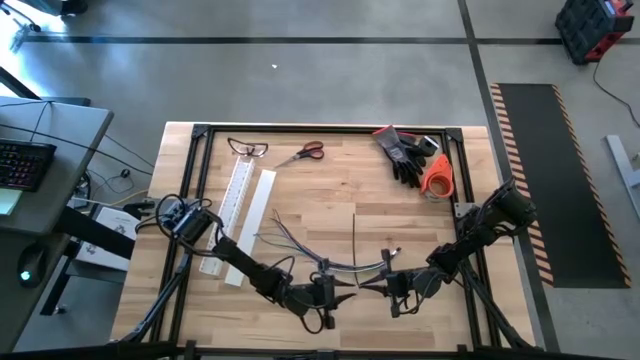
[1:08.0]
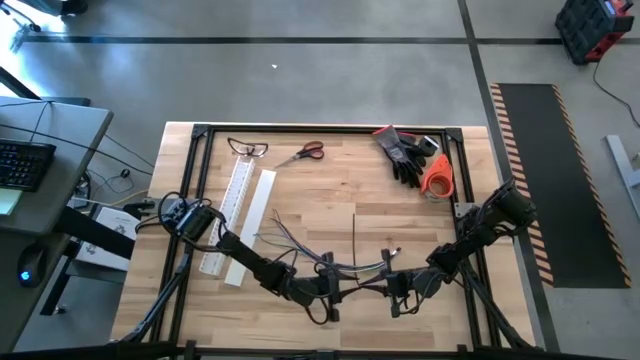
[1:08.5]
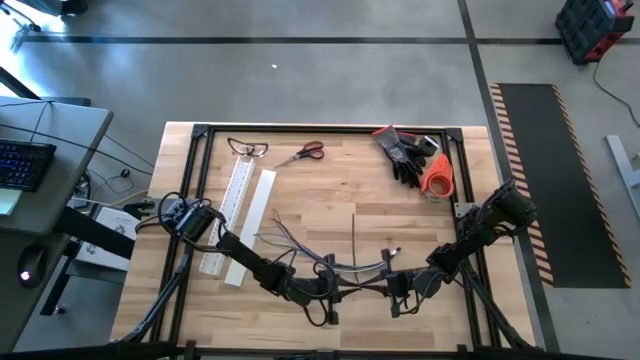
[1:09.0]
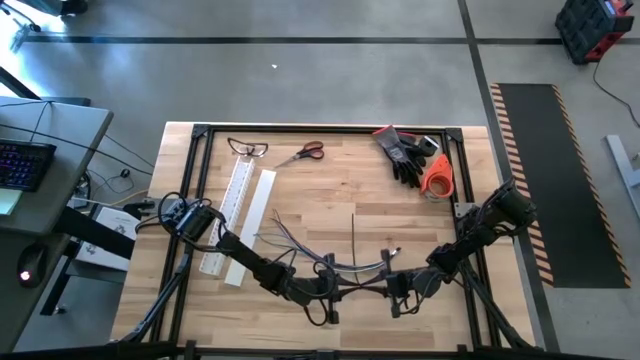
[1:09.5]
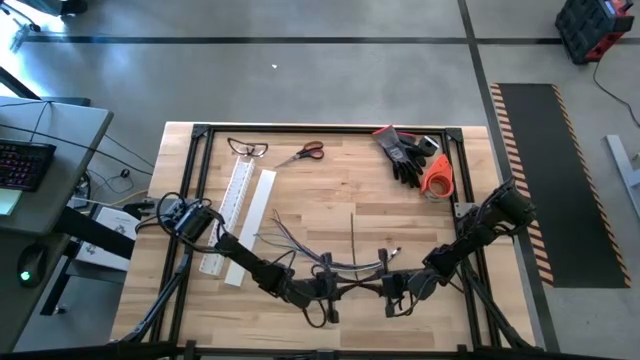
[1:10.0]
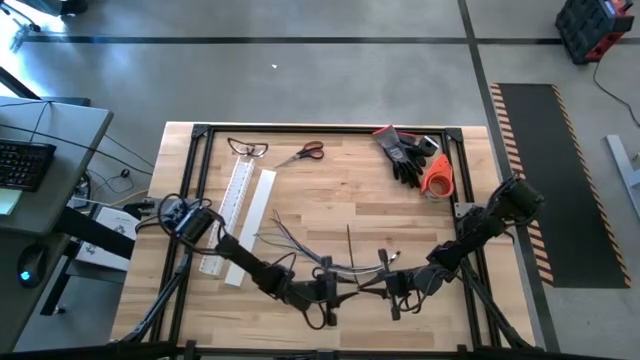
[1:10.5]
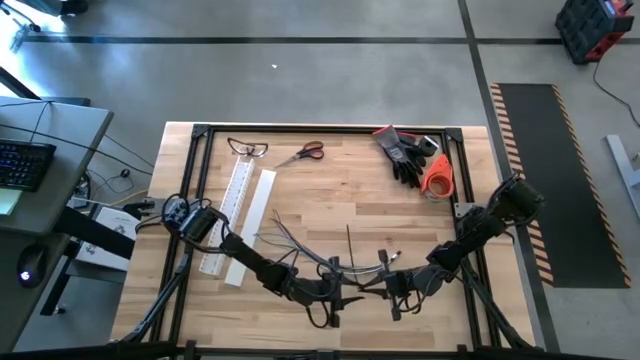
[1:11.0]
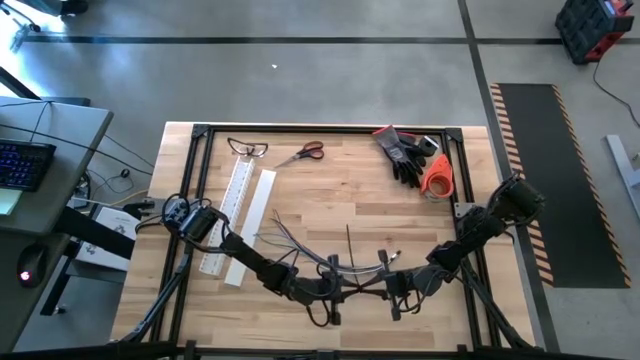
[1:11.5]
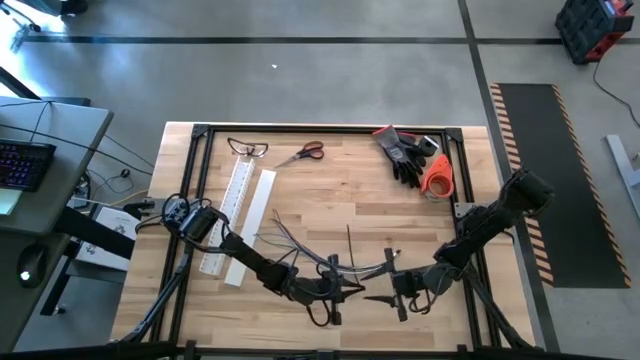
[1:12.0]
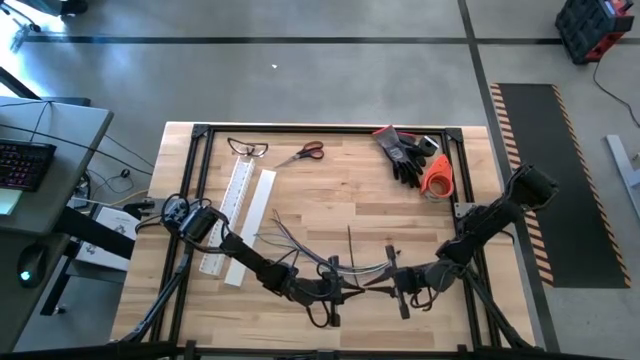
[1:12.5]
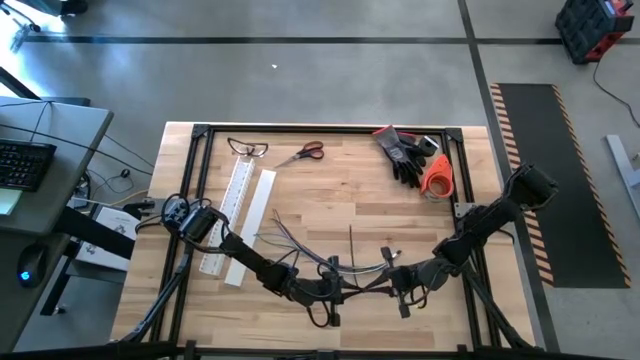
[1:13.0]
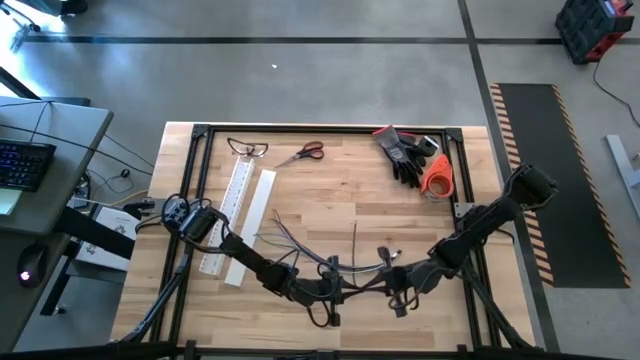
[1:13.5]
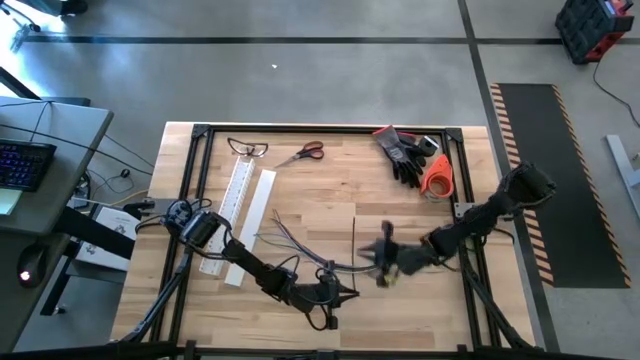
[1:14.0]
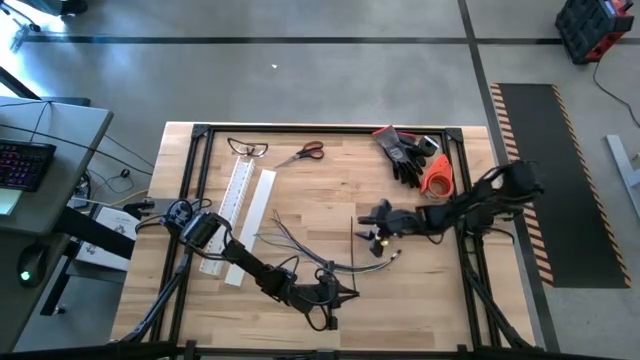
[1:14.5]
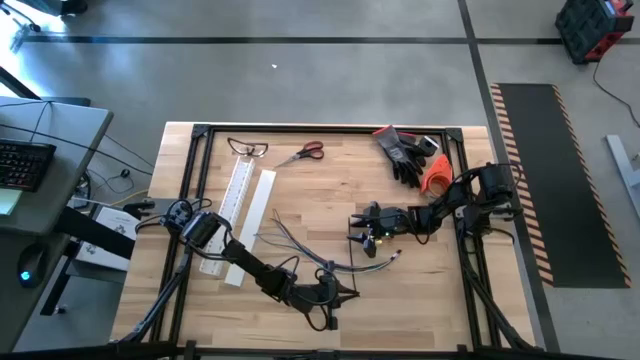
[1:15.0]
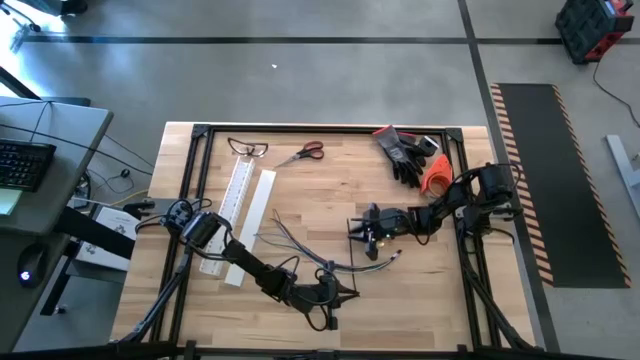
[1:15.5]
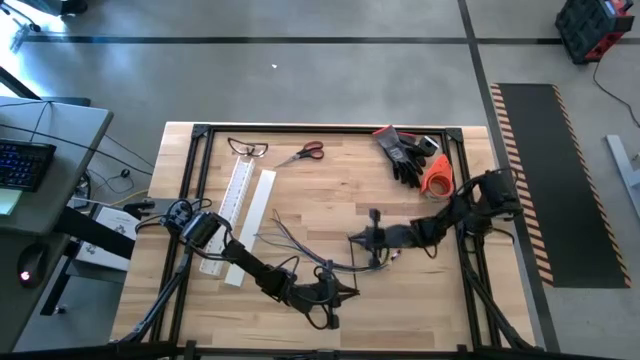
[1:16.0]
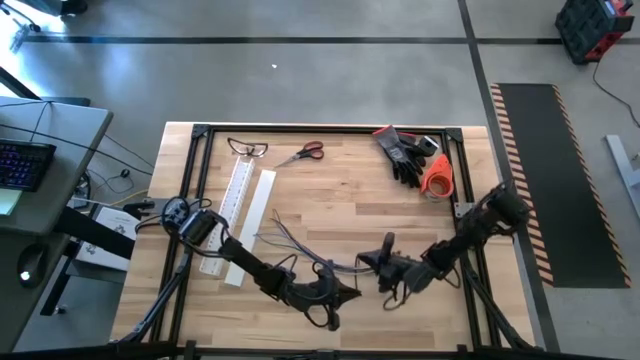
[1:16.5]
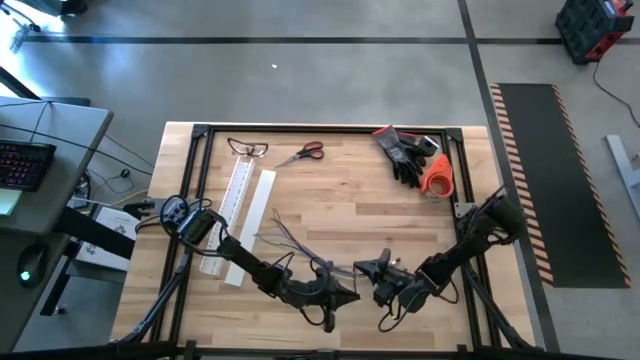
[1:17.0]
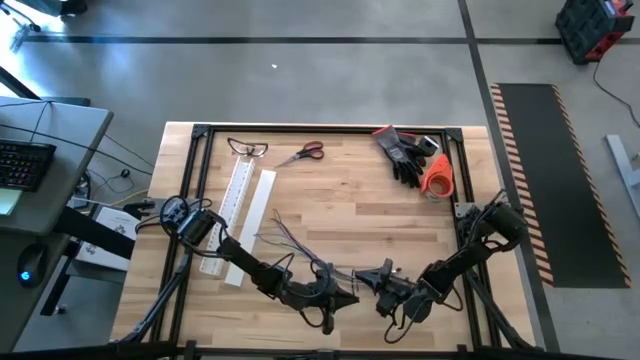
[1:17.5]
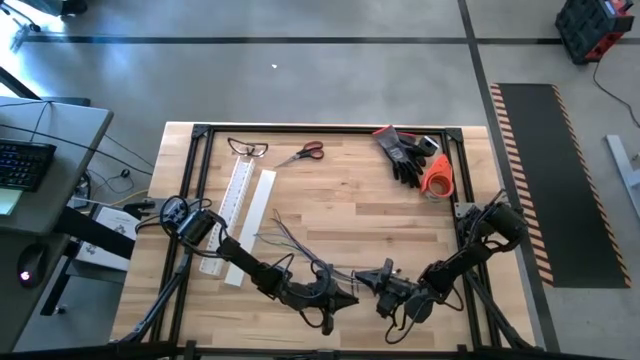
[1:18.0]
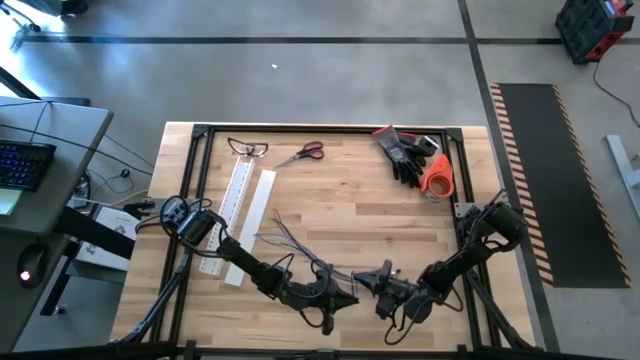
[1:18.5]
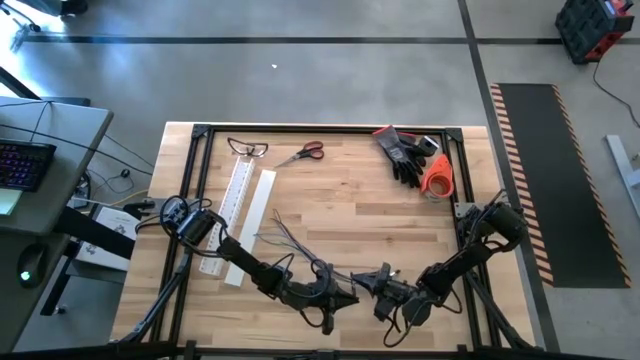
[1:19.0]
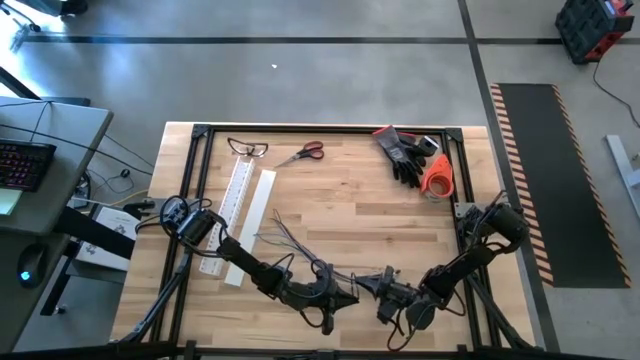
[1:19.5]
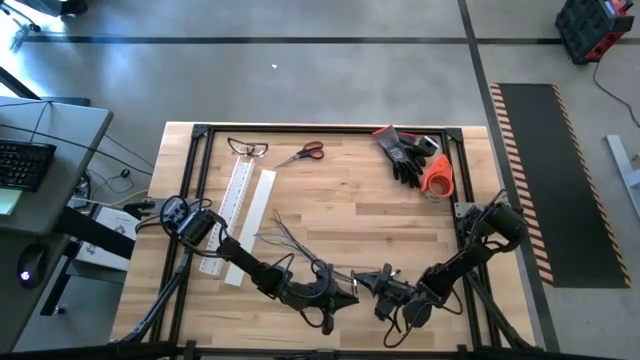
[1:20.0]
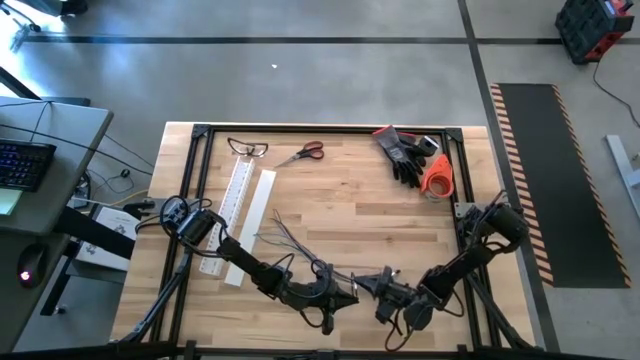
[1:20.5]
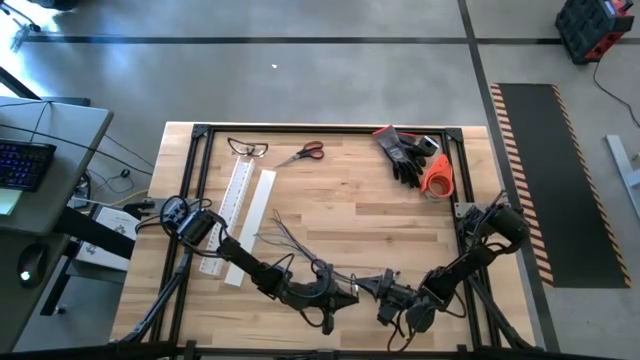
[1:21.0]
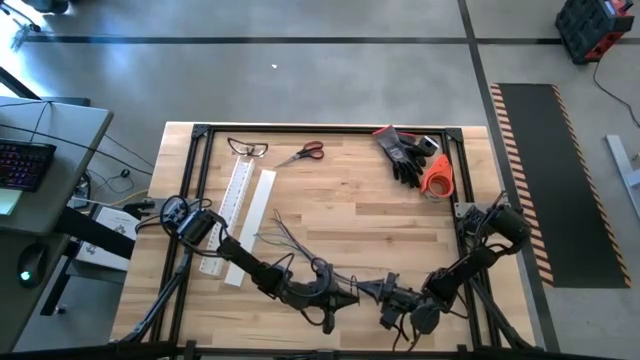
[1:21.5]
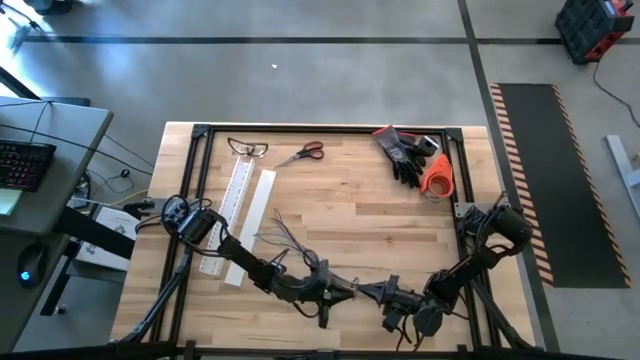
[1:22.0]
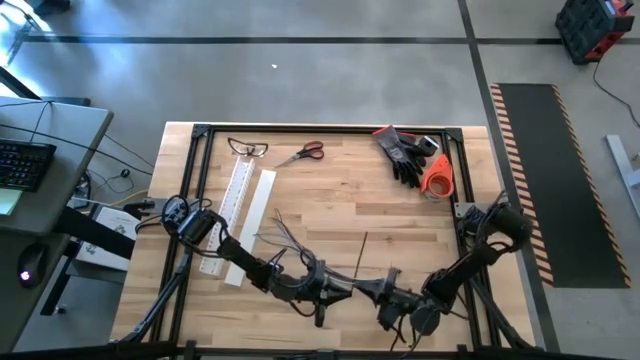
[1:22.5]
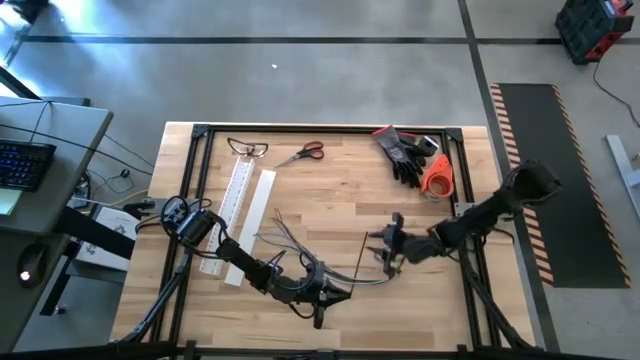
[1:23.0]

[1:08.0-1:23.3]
Task: Ziptie cables
Wrap the black zip tie around the cable

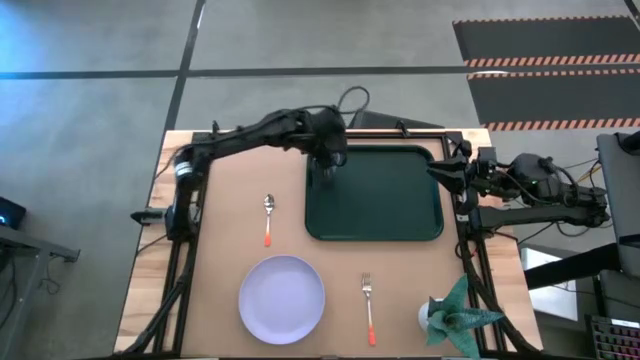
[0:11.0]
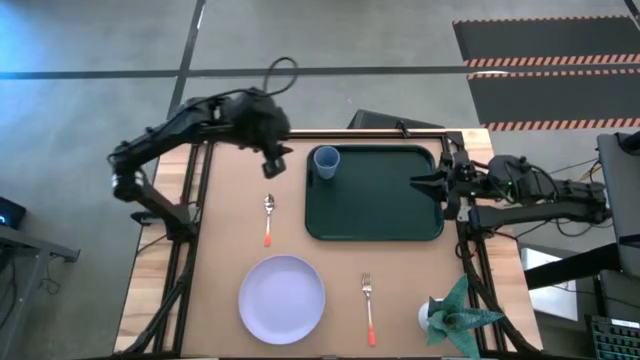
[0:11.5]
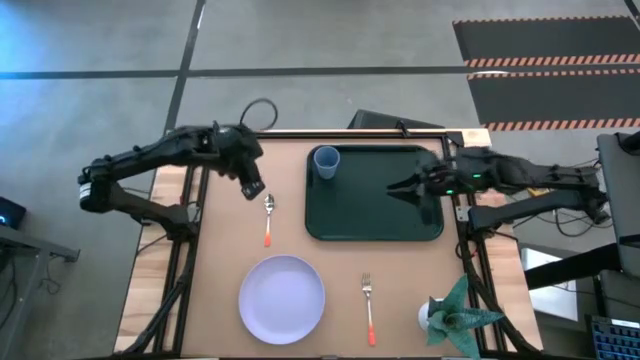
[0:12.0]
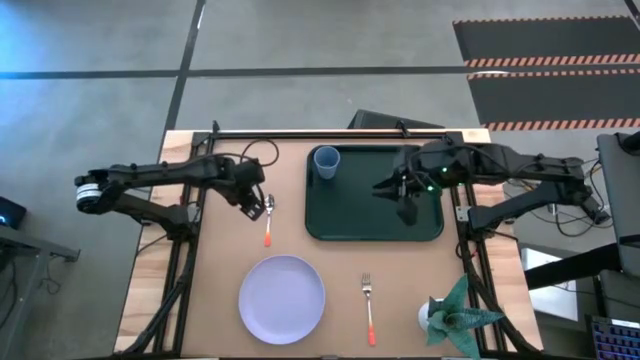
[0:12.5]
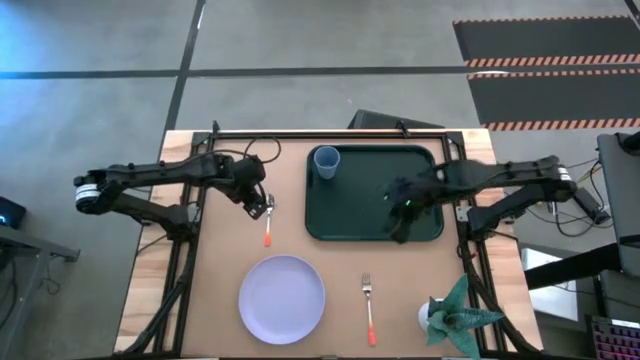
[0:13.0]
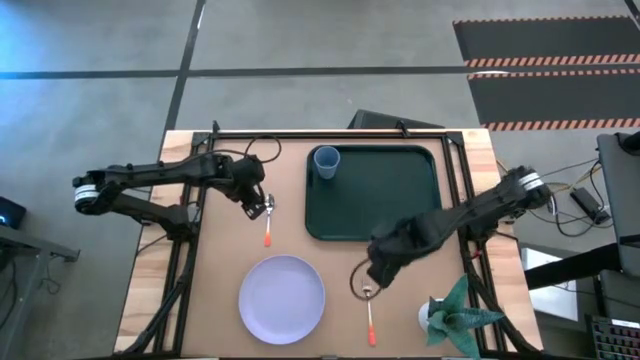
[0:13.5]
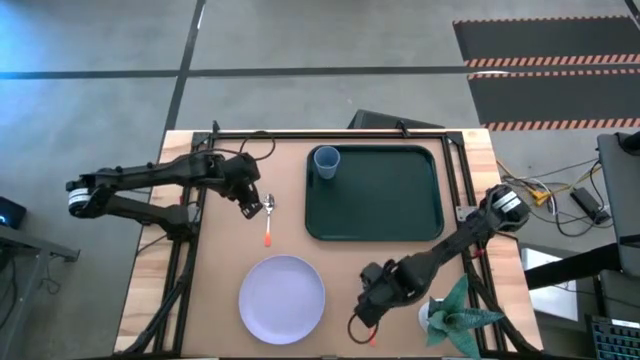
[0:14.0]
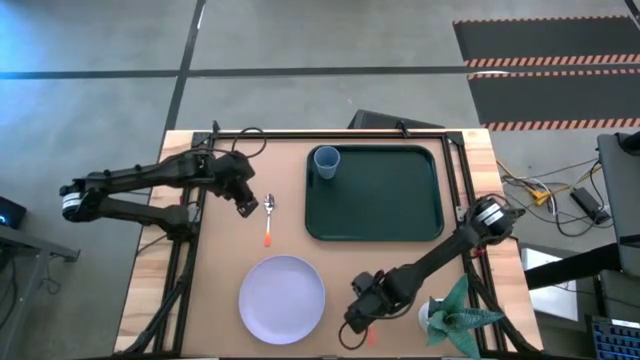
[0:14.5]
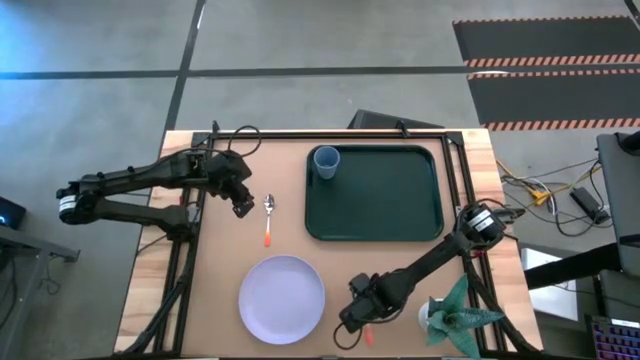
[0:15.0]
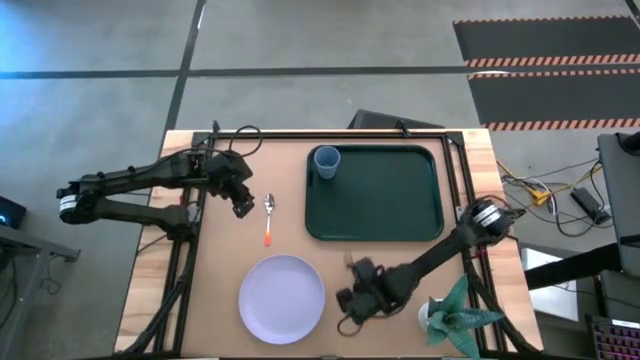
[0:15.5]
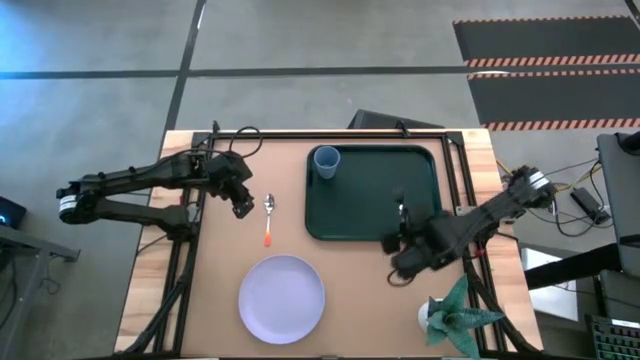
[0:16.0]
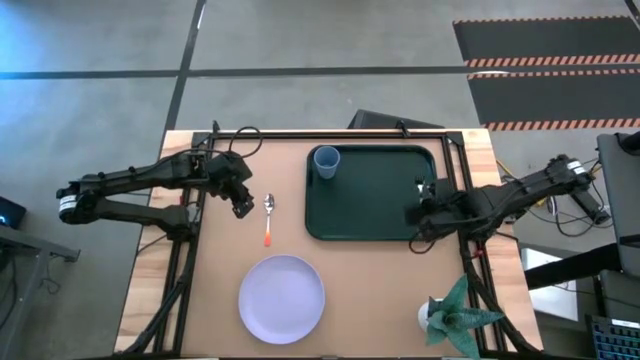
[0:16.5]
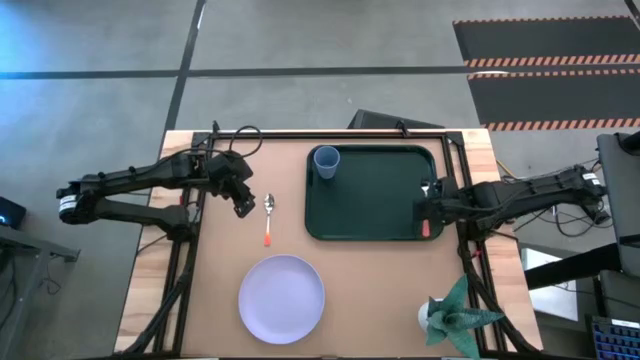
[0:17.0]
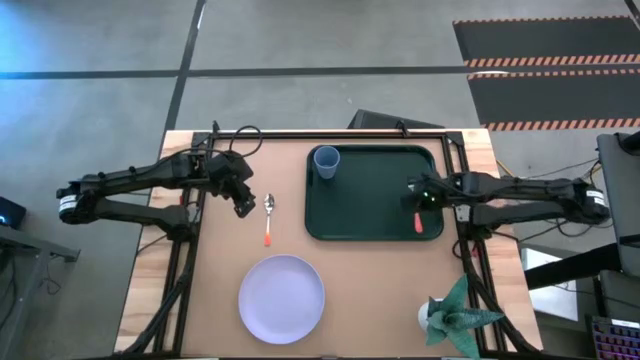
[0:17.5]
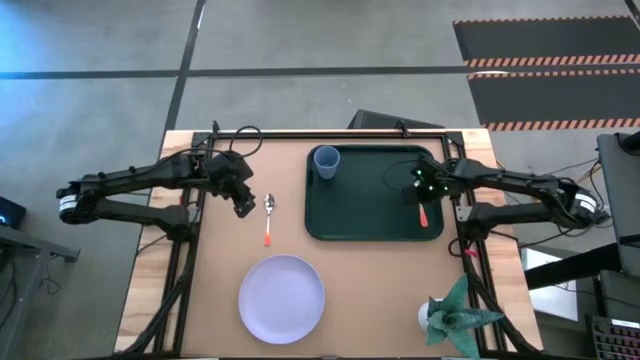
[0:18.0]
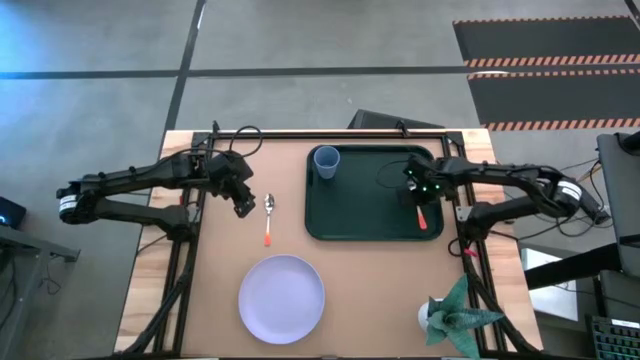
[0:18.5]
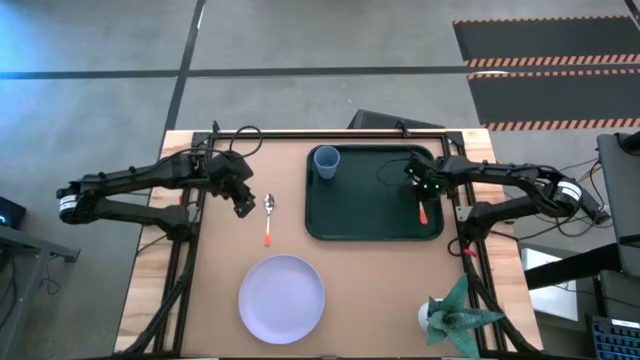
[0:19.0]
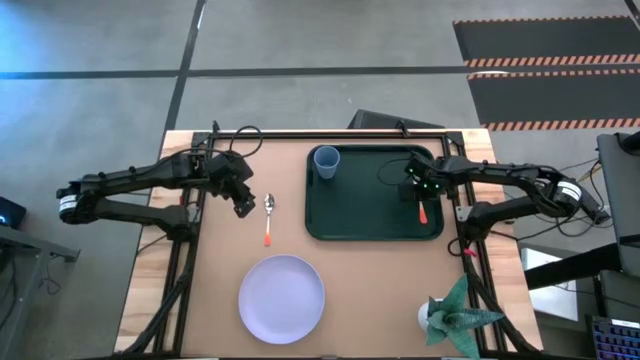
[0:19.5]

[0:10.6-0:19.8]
Task: Pick and place plate/cup/fork/spoon on tray
Put the orange fork on the bottom right of the black tray
